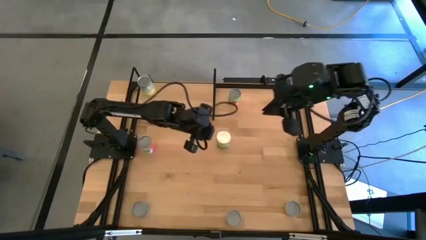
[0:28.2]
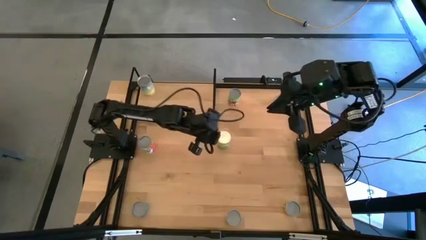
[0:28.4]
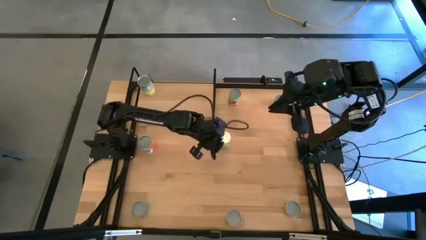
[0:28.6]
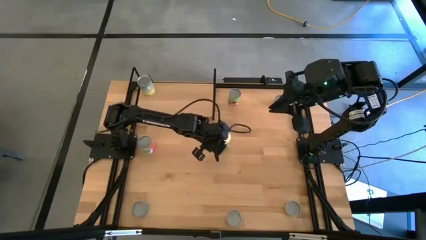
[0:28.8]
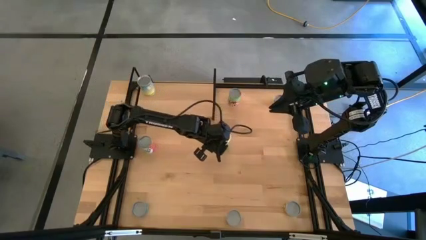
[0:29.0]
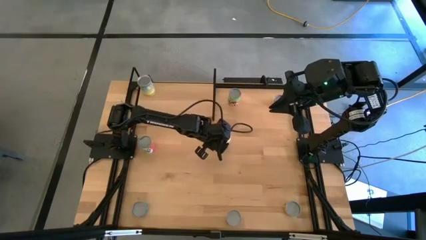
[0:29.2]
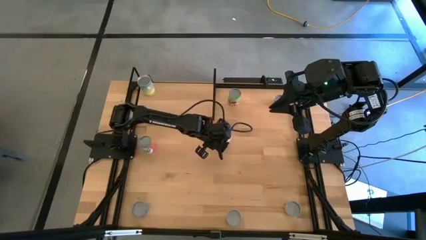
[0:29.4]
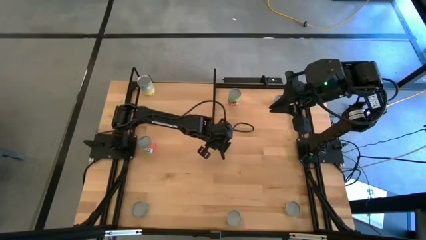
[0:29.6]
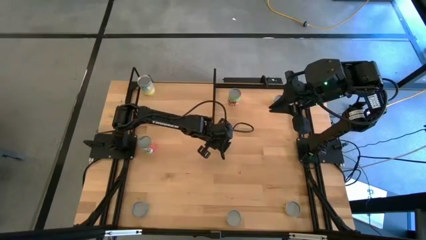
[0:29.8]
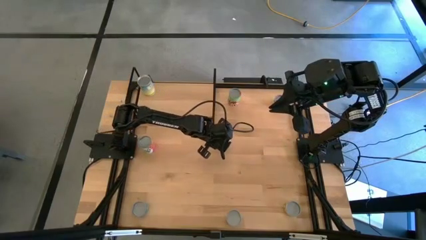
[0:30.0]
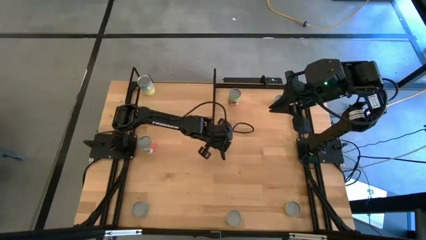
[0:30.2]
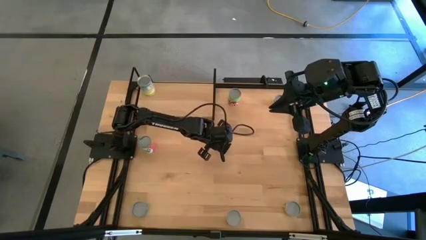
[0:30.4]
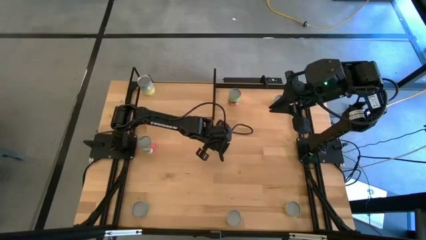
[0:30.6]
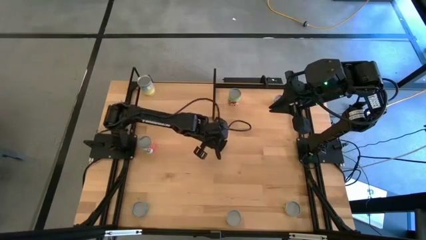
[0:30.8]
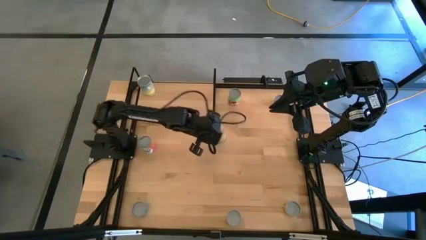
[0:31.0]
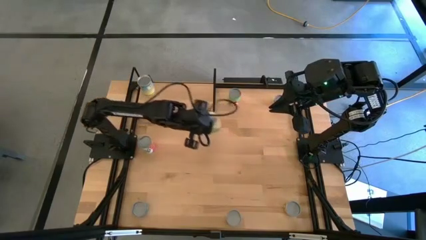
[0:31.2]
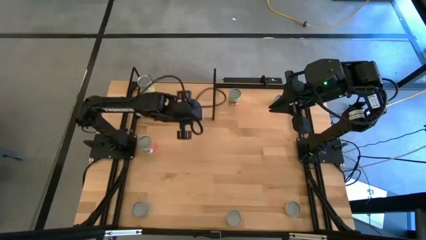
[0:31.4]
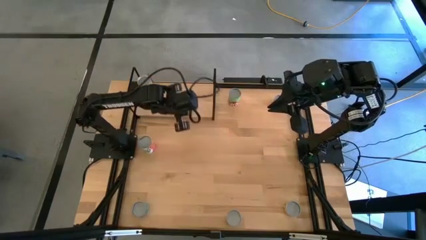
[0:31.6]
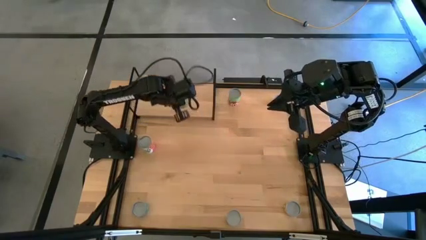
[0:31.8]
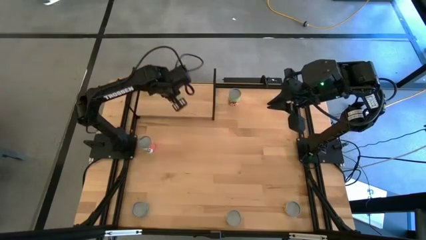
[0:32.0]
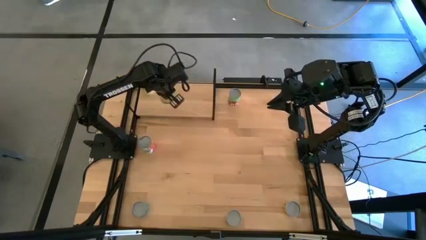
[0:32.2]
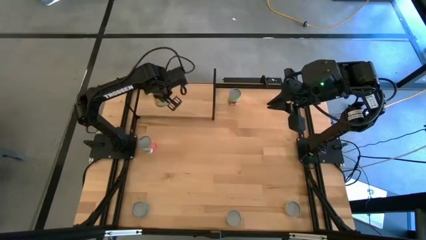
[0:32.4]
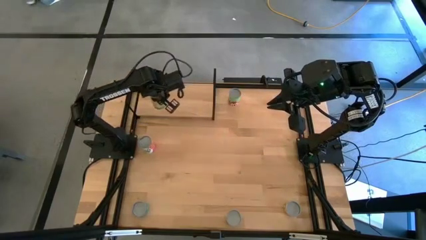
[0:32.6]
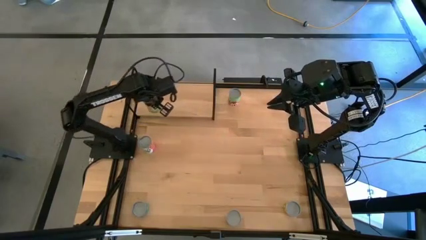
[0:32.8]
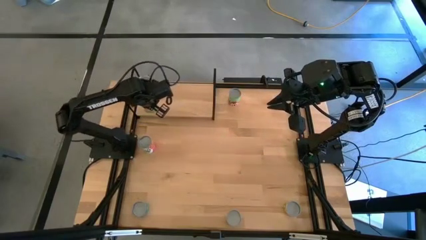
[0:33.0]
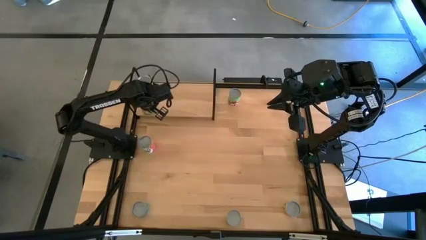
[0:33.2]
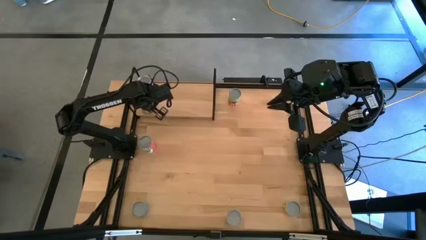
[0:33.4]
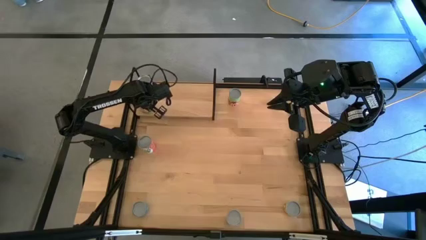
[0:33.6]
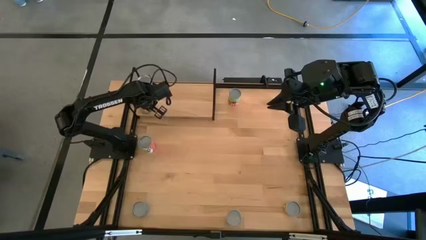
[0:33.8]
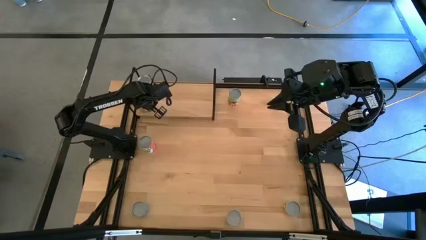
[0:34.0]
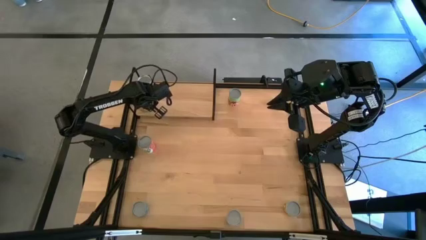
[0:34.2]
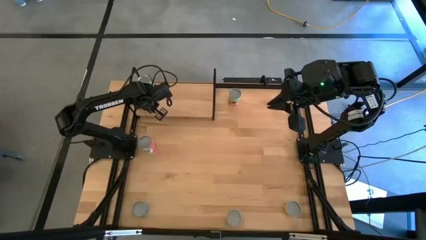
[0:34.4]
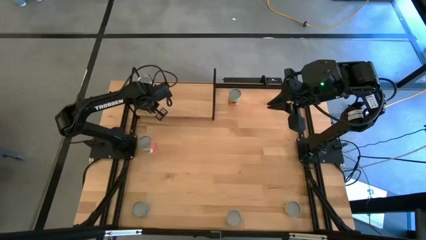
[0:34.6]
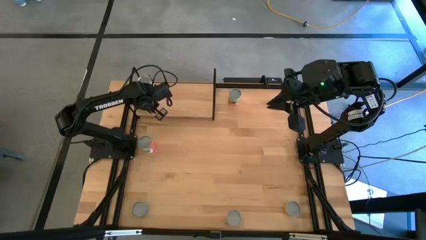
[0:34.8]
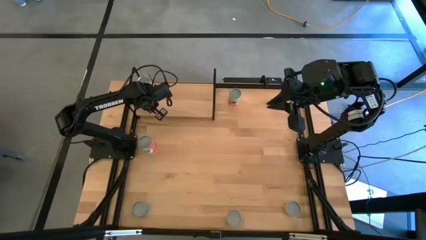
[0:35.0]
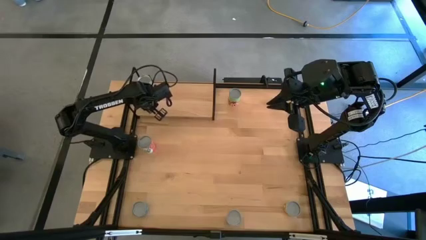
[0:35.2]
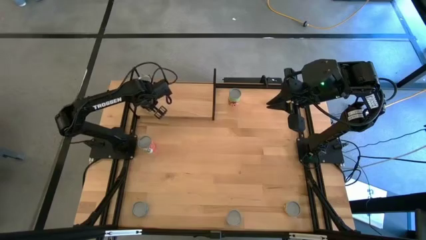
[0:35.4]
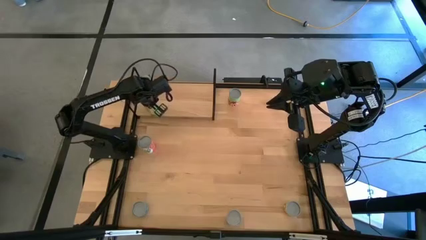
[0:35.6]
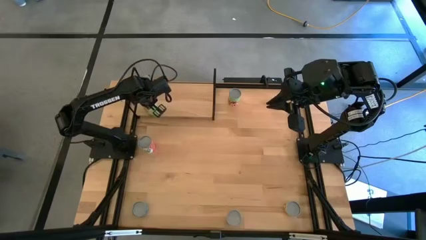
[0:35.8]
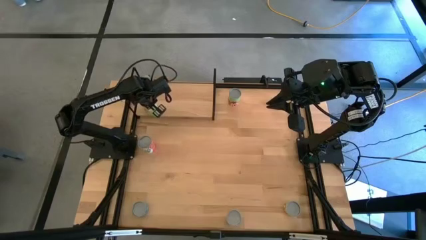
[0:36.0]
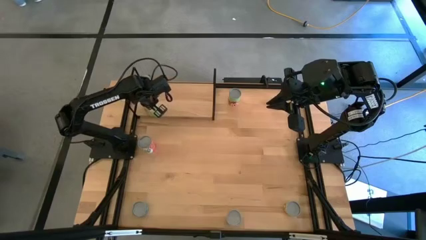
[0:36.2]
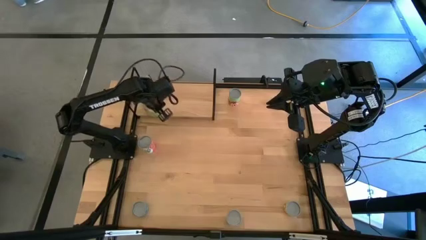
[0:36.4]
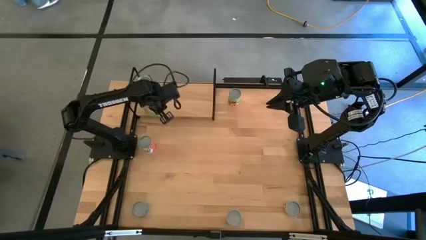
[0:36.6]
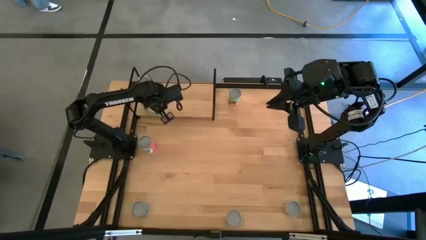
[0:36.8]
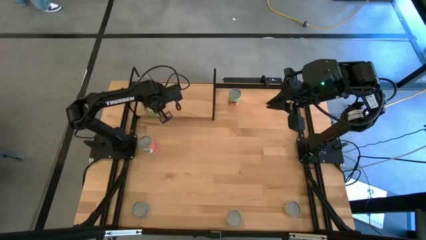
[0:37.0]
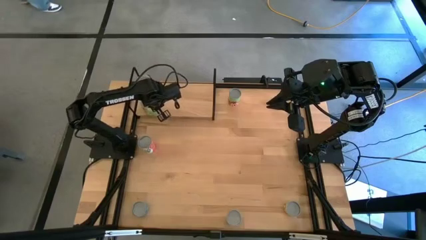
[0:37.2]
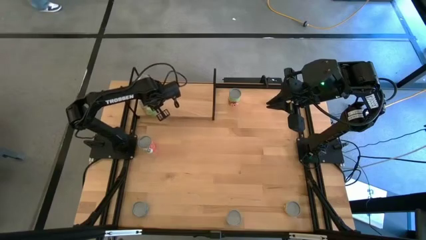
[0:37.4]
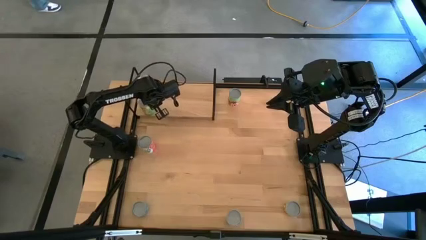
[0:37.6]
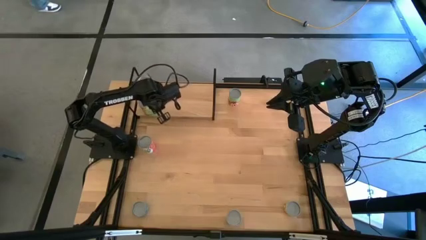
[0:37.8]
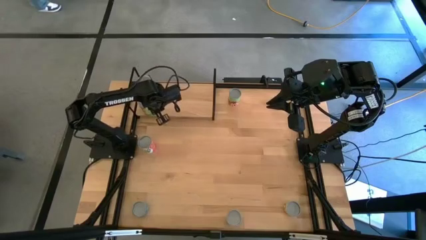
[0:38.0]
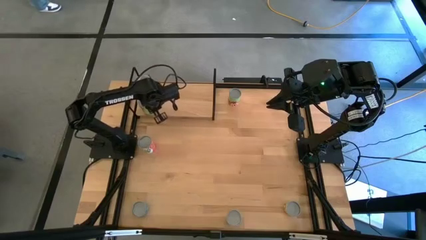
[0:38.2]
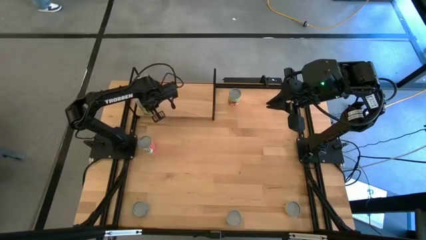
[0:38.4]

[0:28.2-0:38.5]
Task: Pick and place cans onto a shelf
Put the canned orange on the shelf

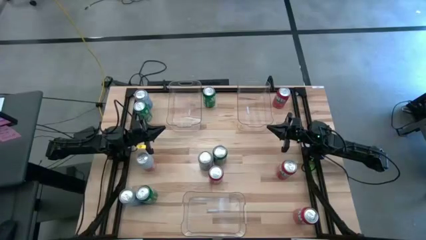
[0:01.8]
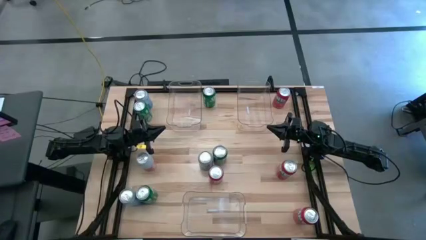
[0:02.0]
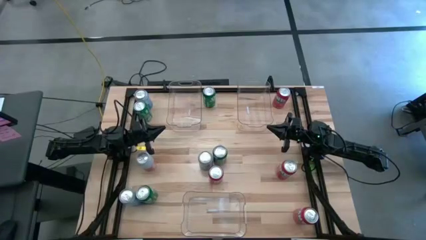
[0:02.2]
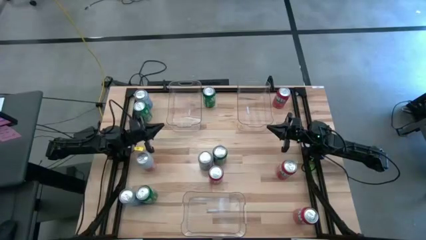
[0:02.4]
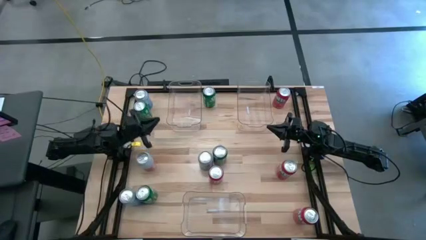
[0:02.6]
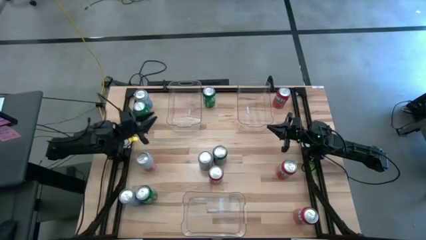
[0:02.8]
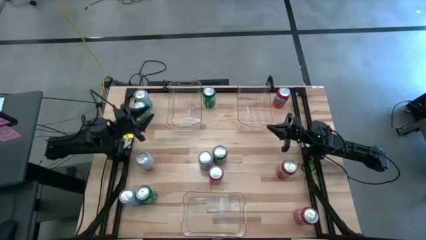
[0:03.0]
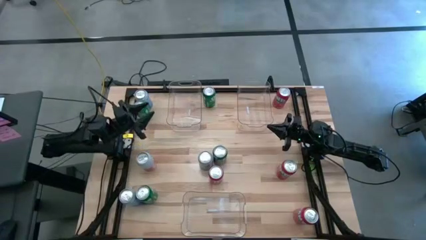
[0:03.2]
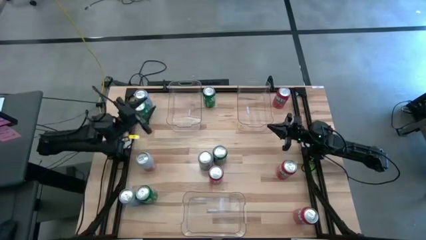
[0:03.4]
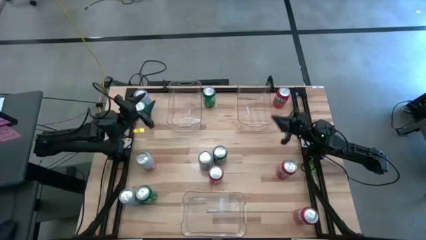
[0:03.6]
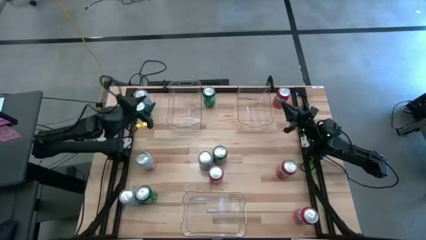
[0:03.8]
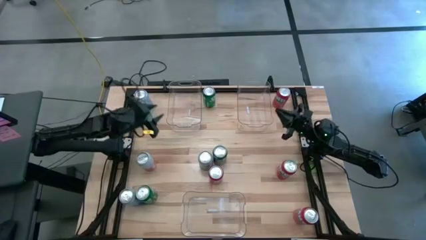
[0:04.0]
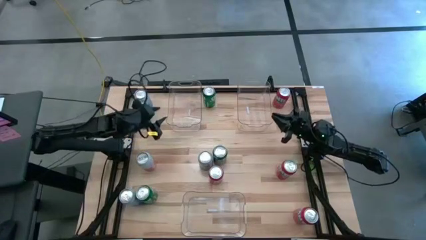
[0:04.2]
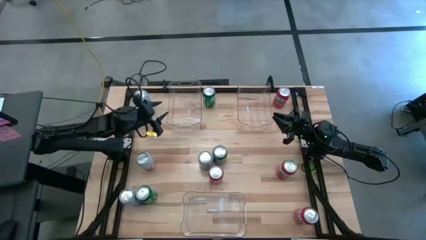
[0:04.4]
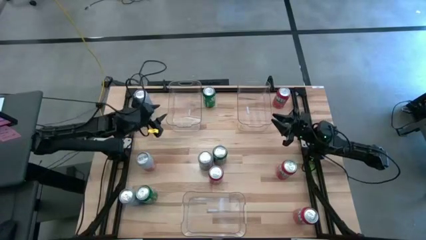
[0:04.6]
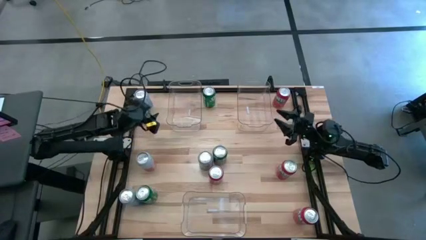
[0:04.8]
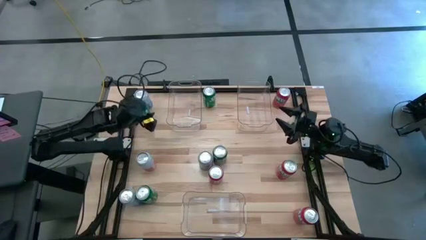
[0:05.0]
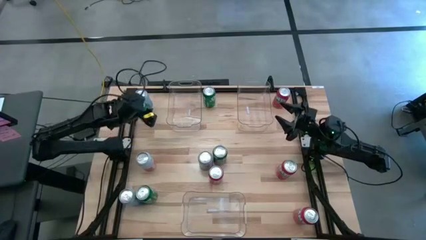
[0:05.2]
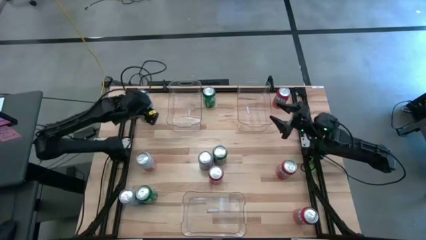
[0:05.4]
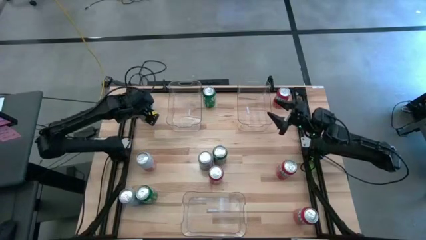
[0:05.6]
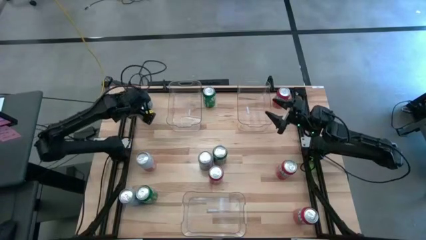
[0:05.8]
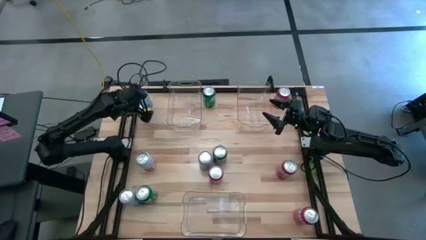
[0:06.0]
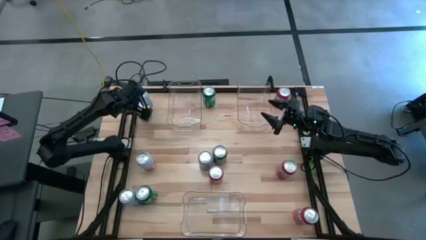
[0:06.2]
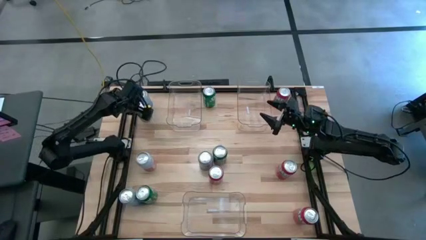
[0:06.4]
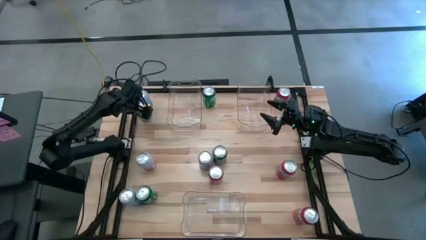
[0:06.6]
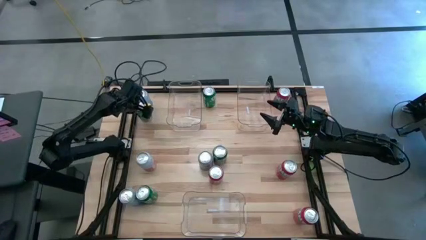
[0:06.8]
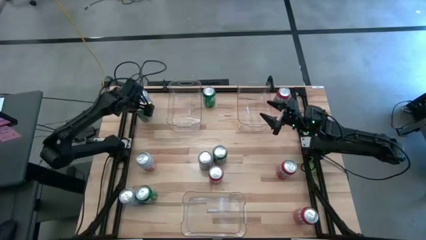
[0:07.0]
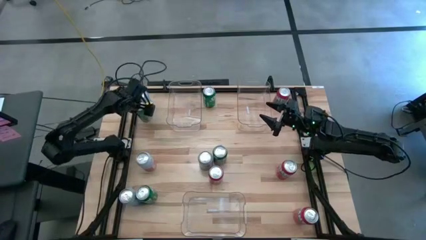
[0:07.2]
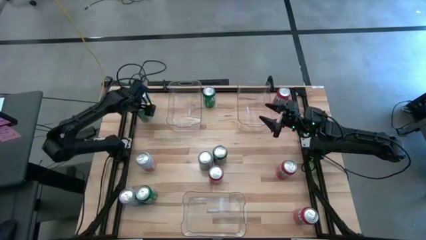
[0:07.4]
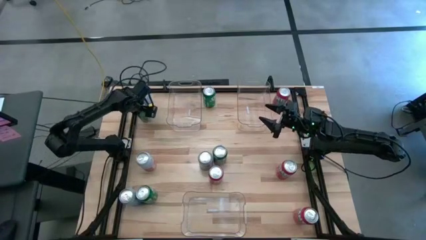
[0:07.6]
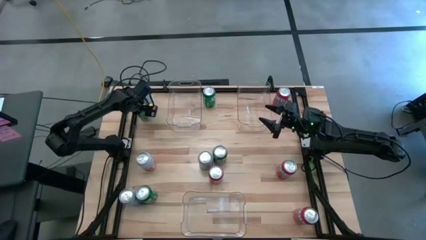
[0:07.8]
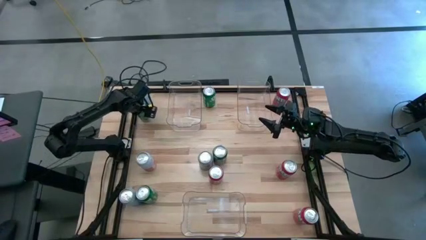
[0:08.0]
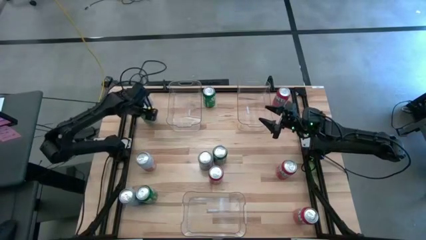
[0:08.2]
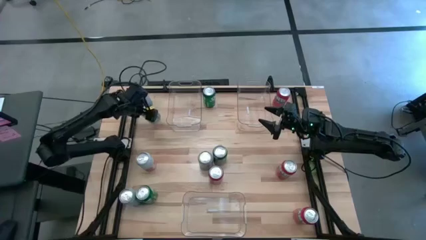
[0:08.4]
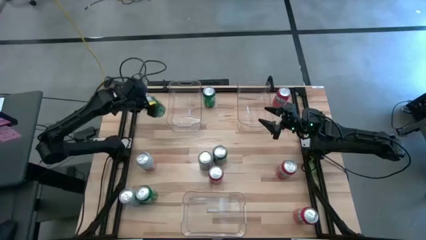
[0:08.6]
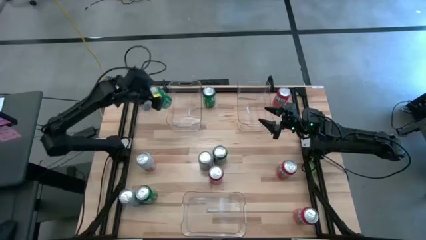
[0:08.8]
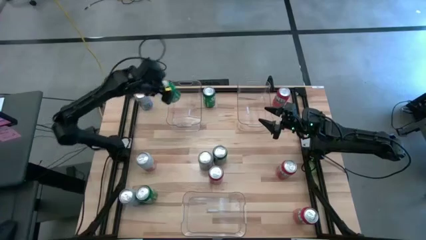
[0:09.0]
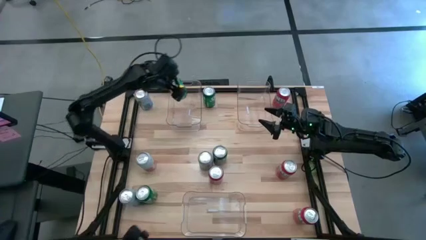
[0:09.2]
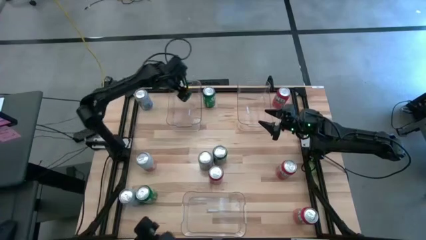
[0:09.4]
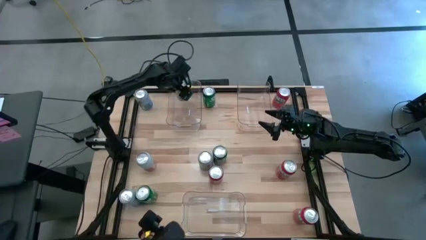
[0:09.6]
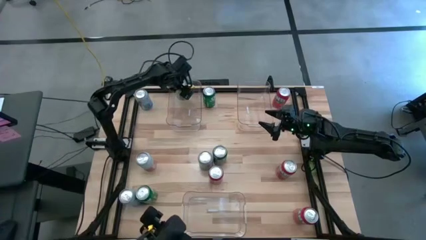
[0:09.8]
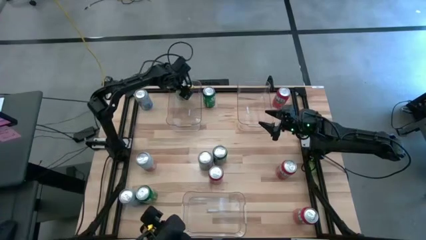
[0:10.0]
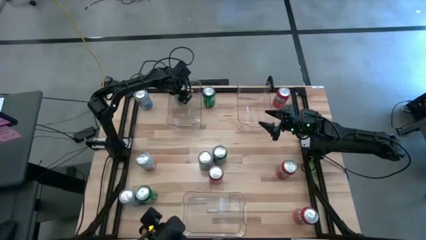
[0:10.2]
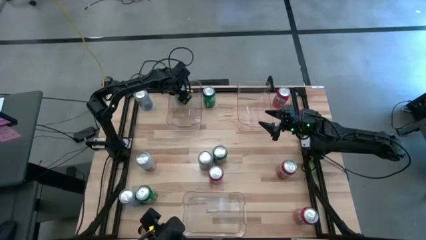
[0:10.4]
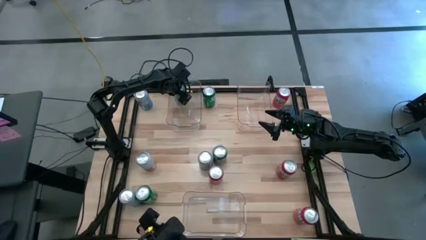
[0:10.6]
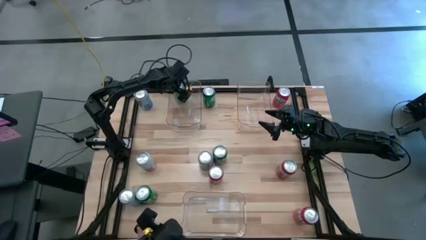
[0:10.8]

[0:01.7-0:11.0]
Task: Sort soda cans
Put the green soda can into the top left transparent bin
